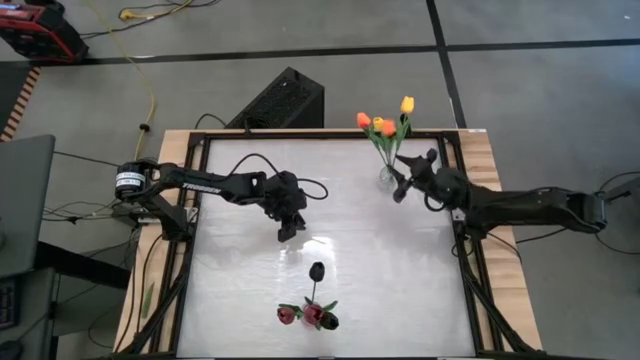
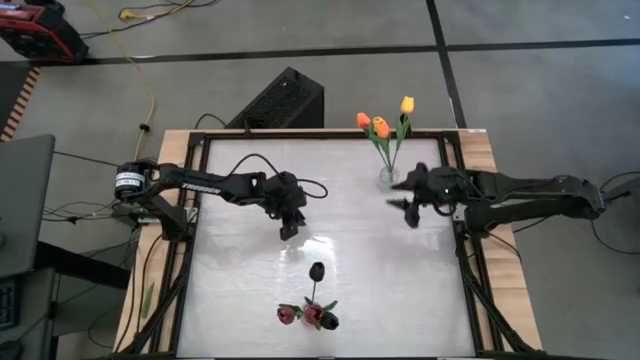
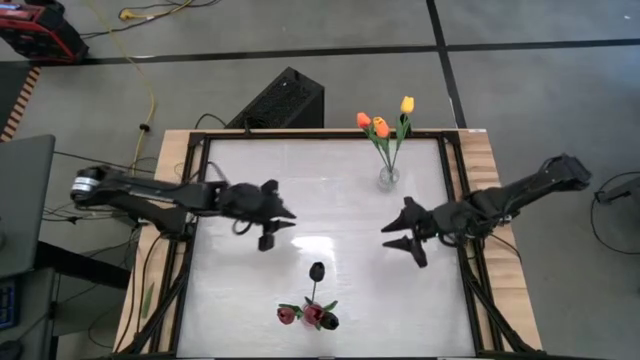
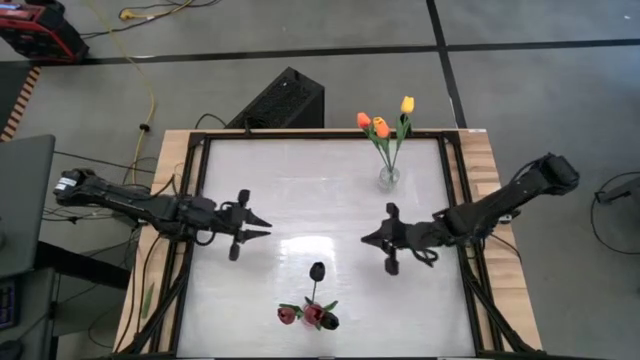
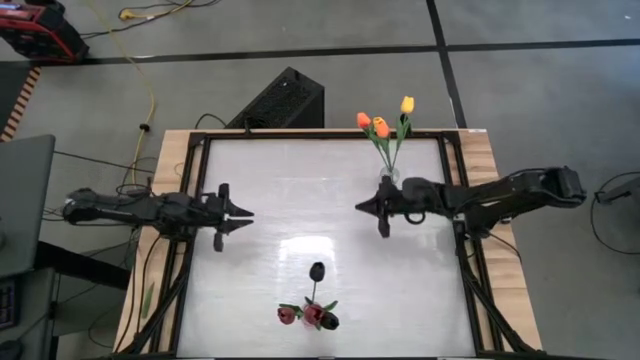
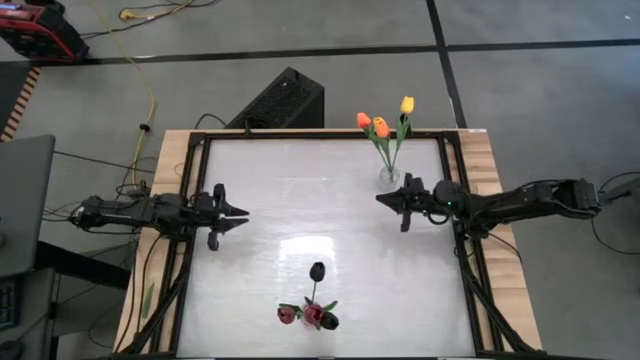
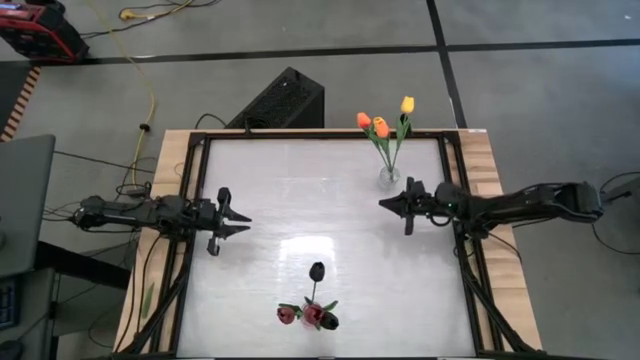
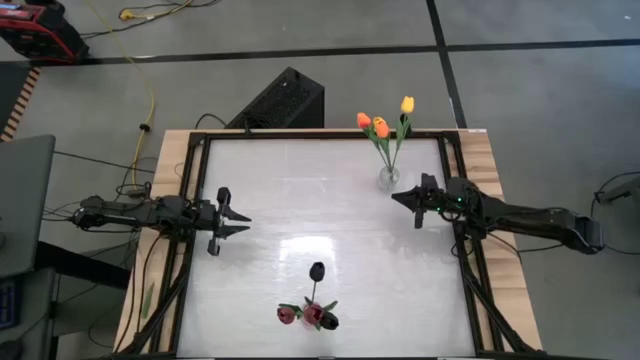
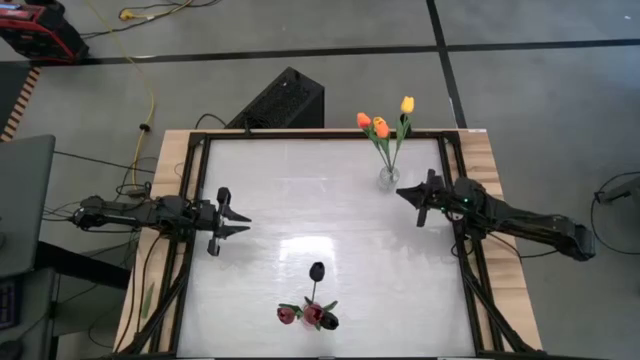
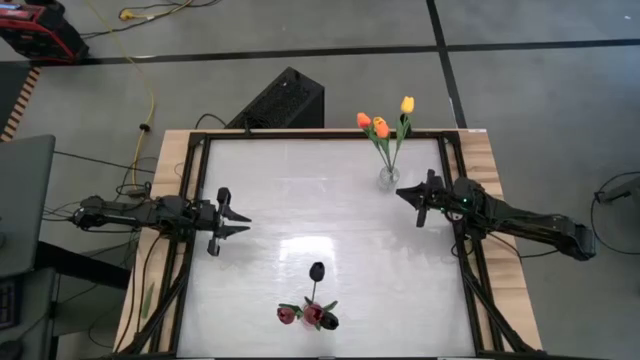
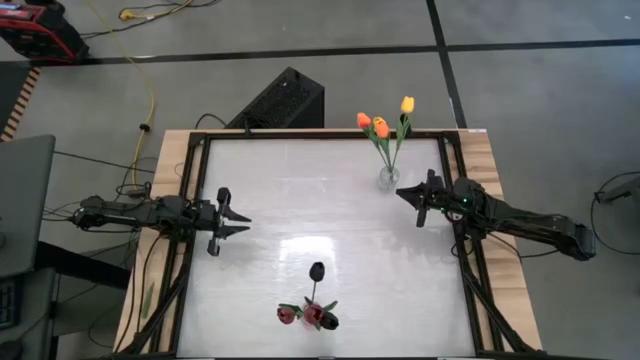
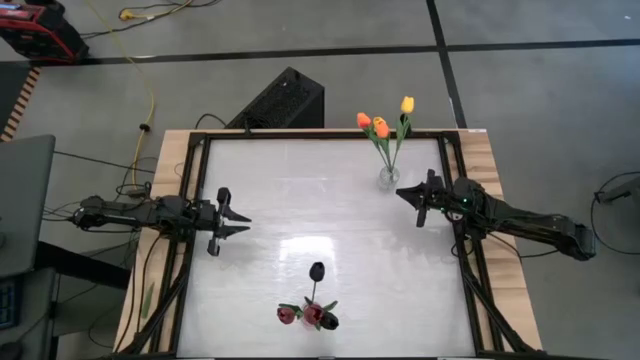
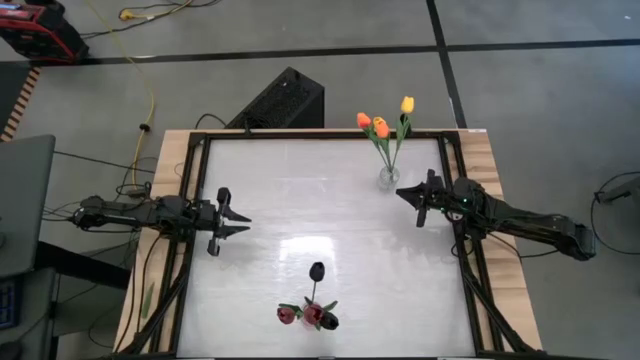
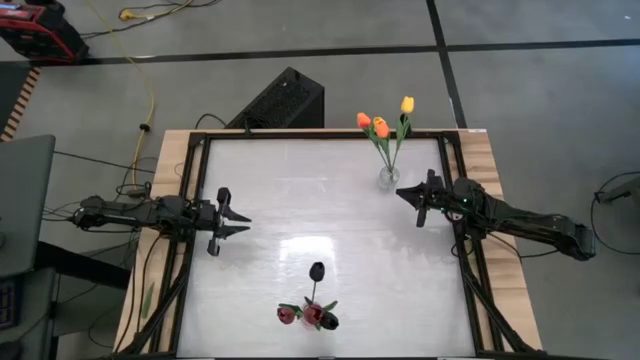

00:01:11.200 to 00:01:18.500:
Task: Sort flowers into vase by color
Return to Home Position

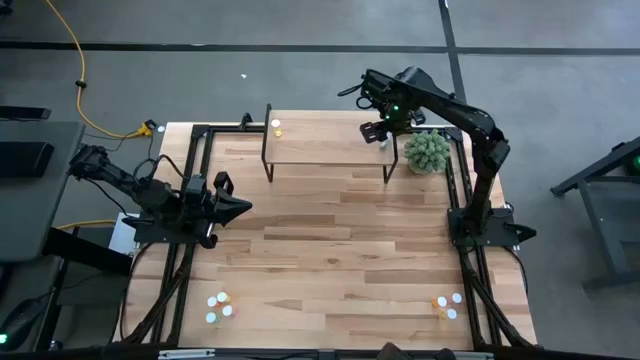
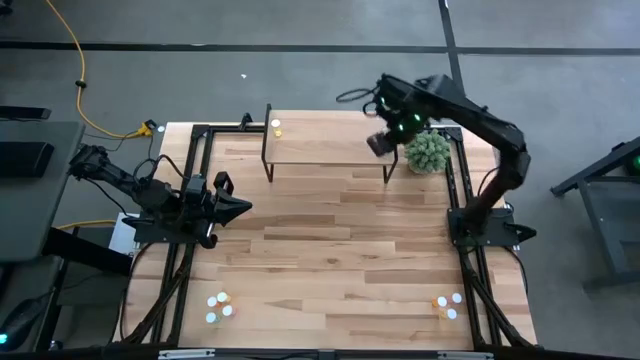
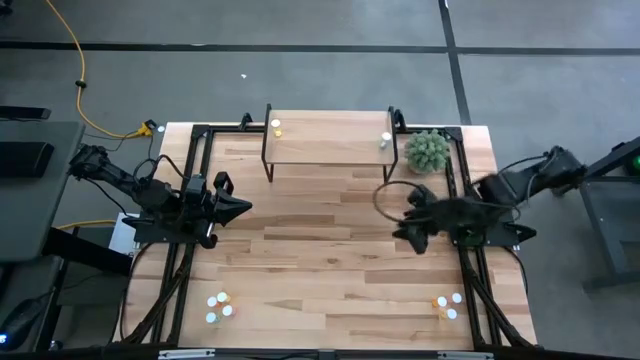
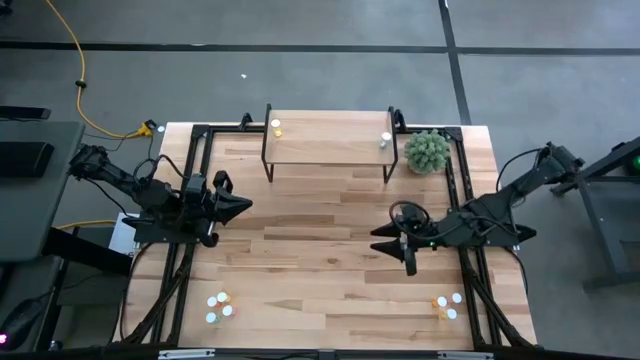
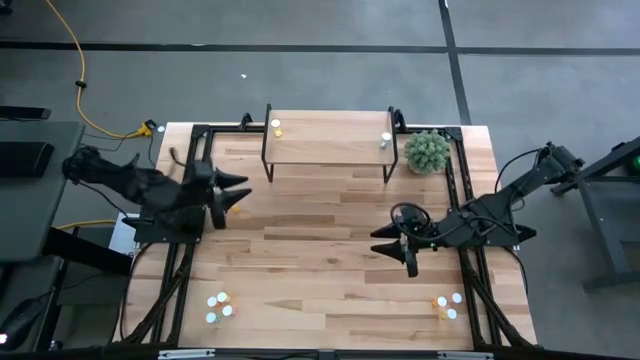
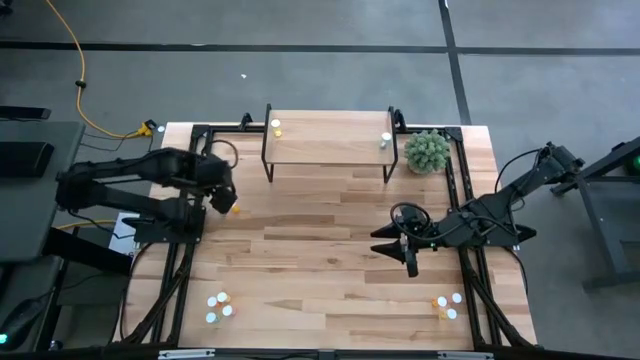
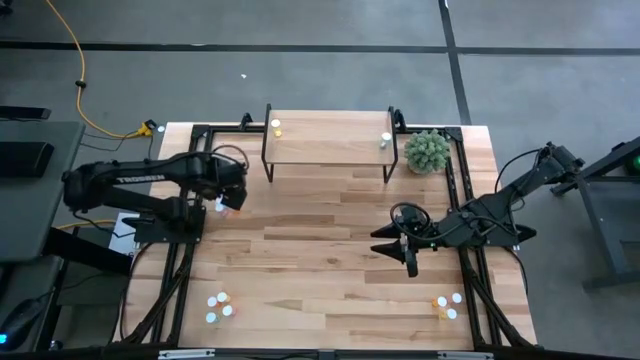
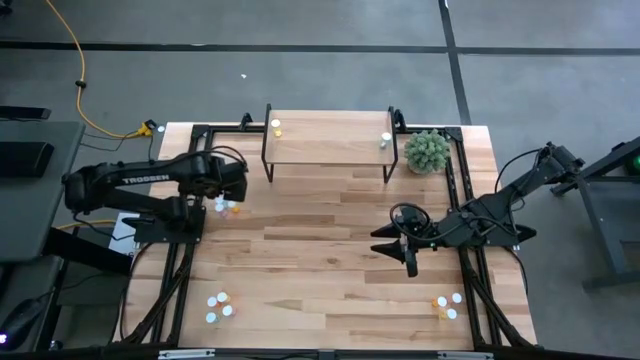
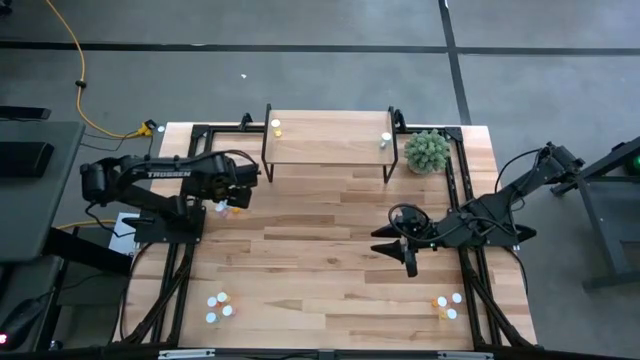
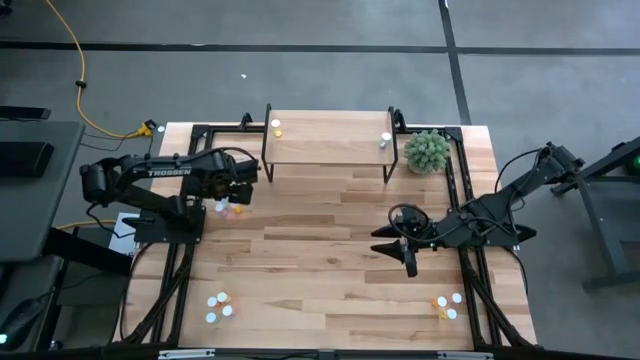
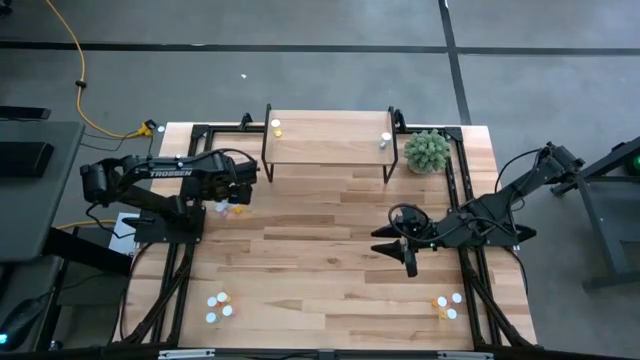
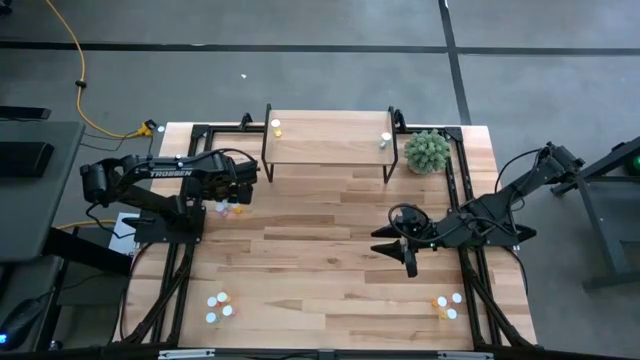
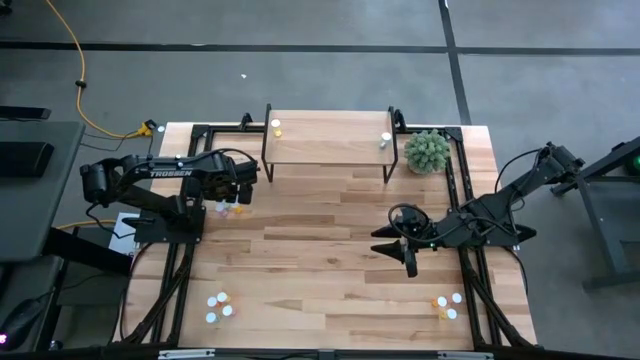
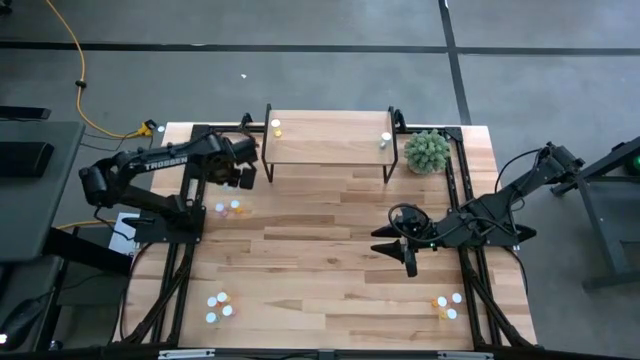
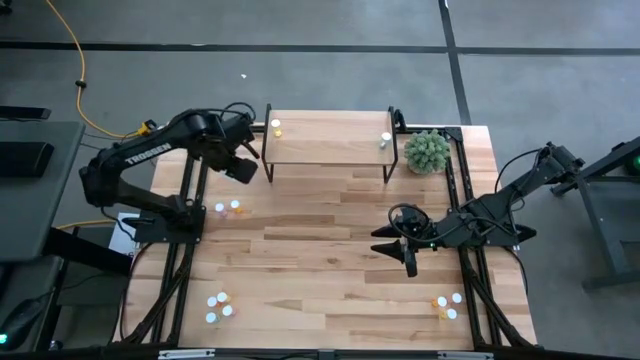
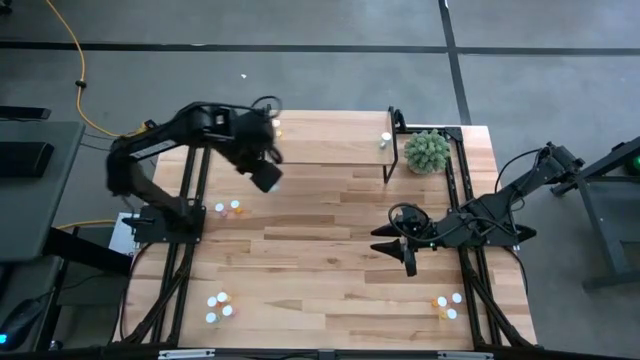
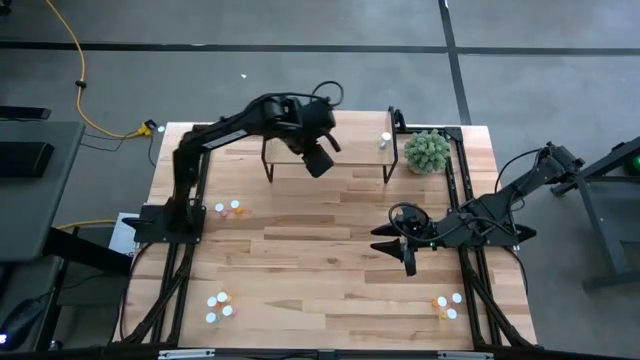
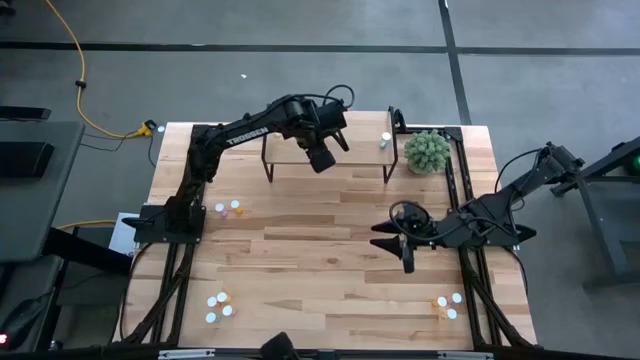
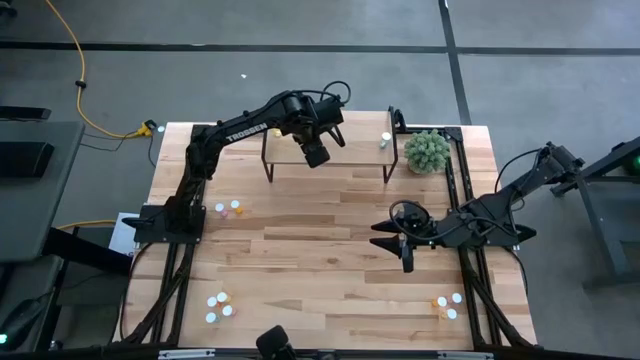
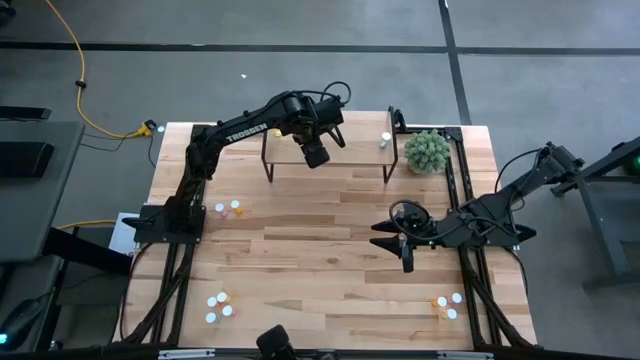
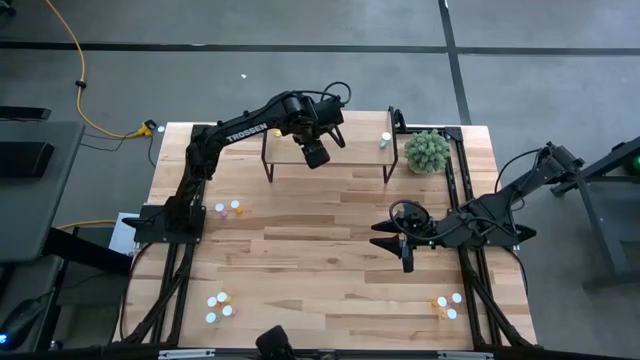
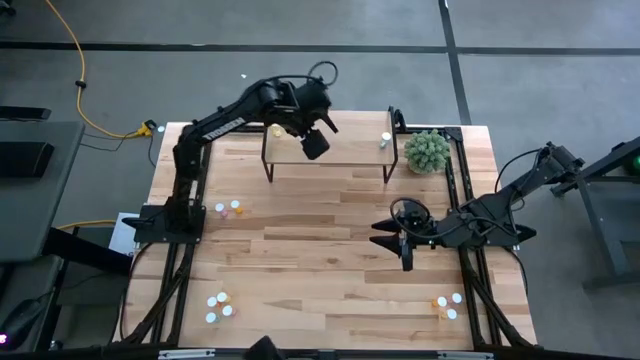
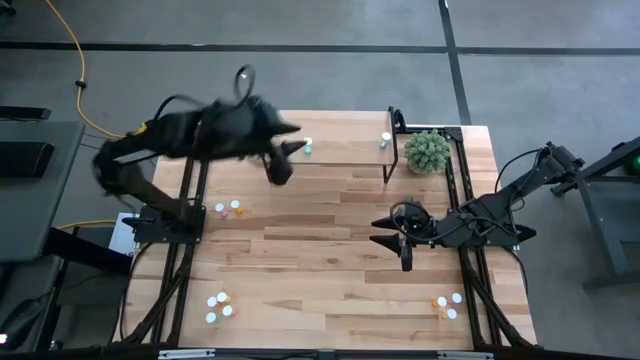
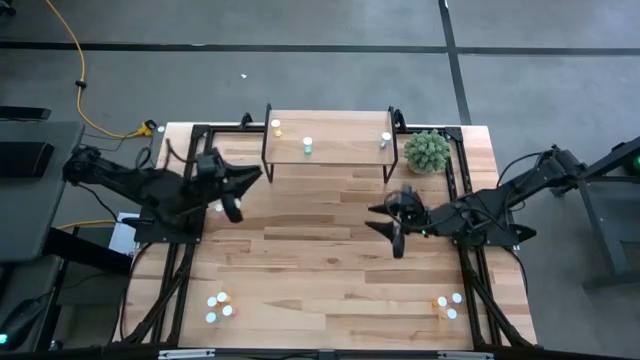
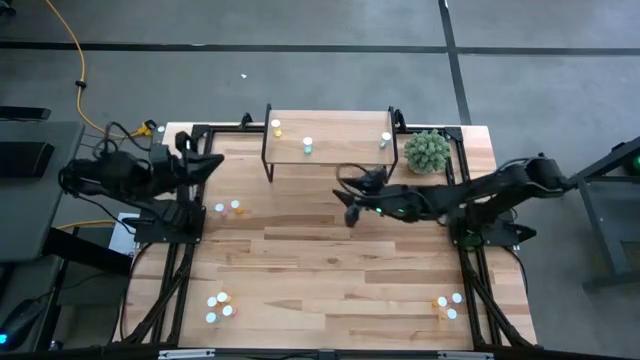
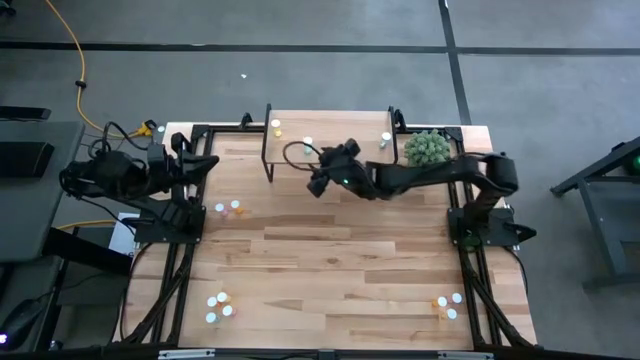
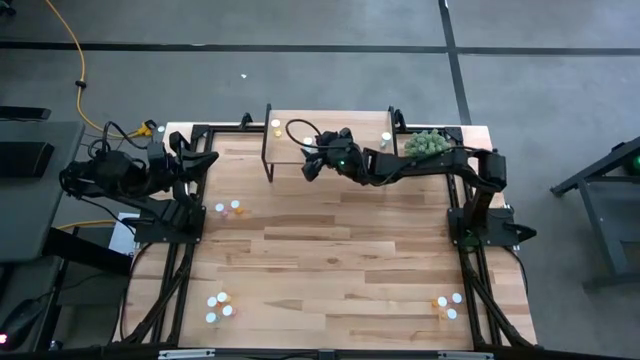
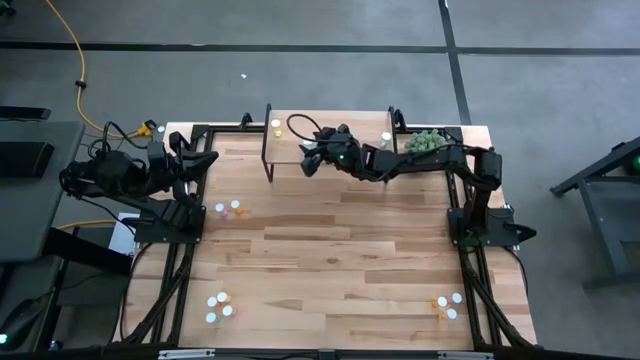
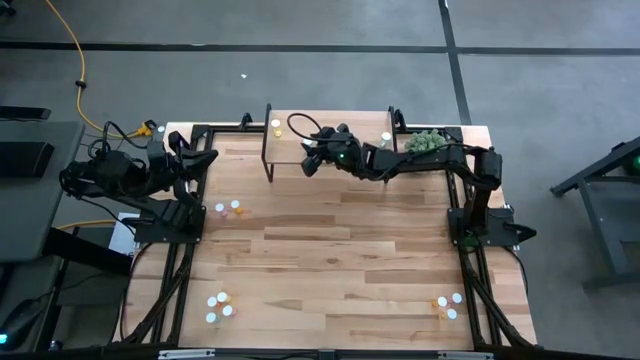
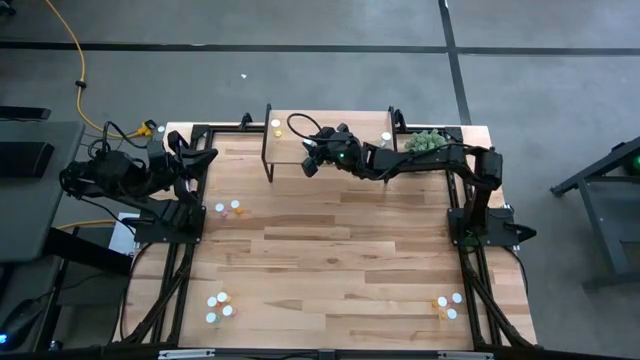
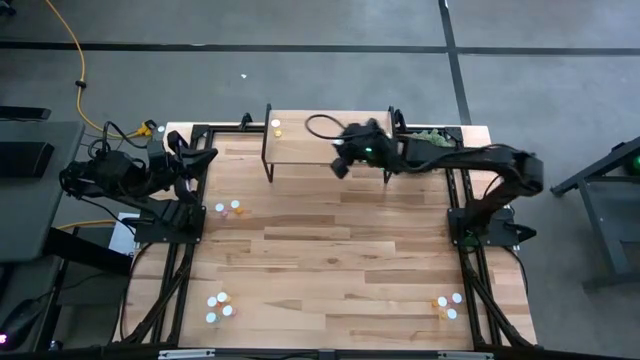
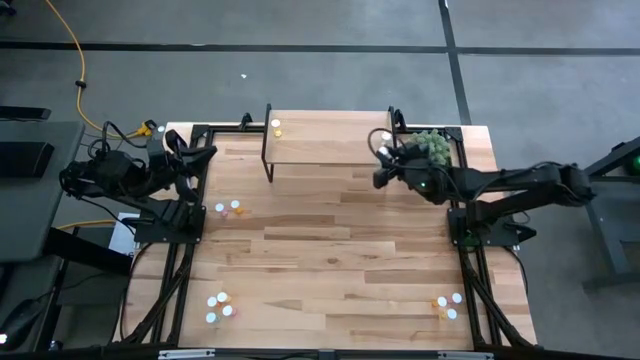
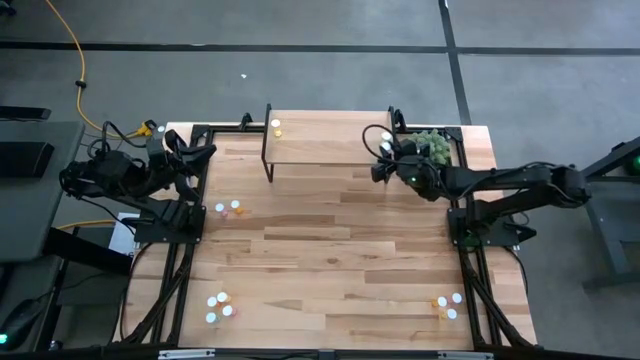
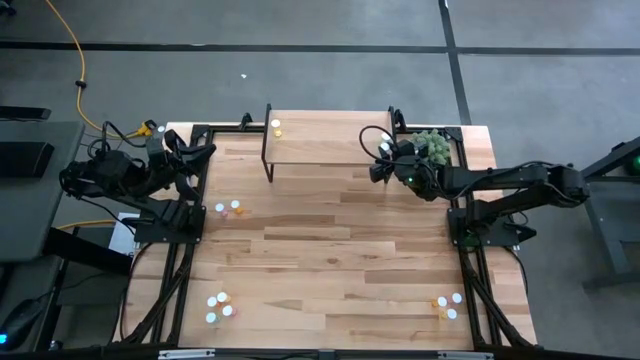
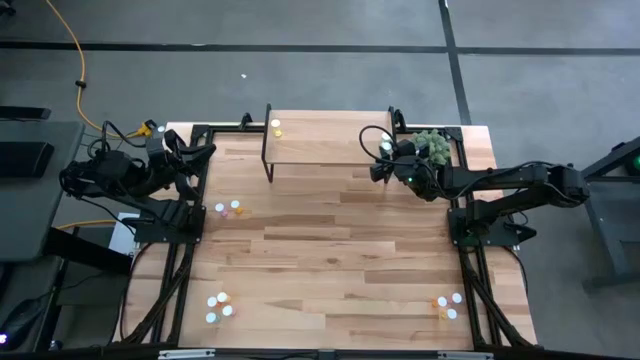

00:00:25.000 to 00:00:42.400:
Task: Pick and place medicine bottles onto shelf by color
Put the top blue pill bottle aligned with the other blue pill bottle on the shelf
